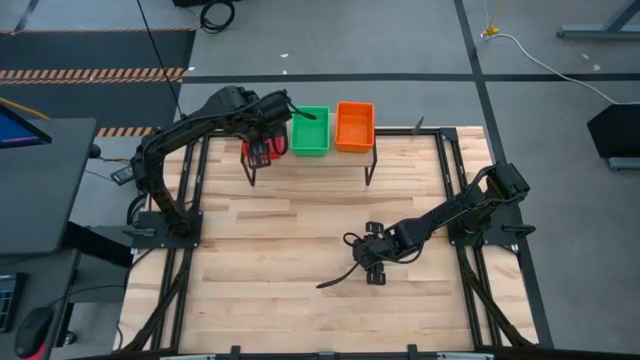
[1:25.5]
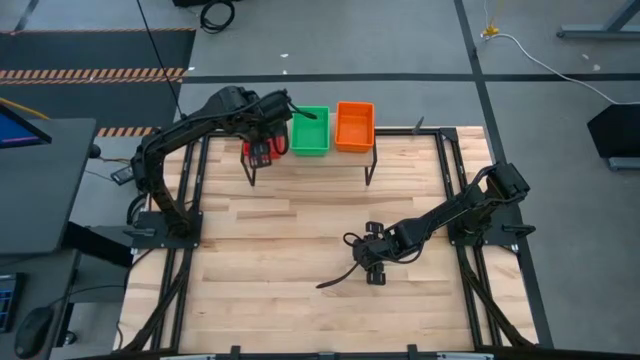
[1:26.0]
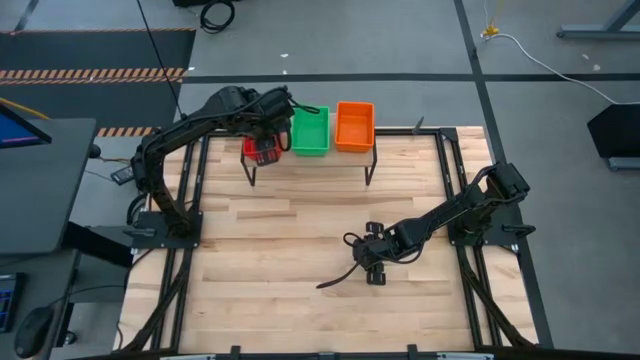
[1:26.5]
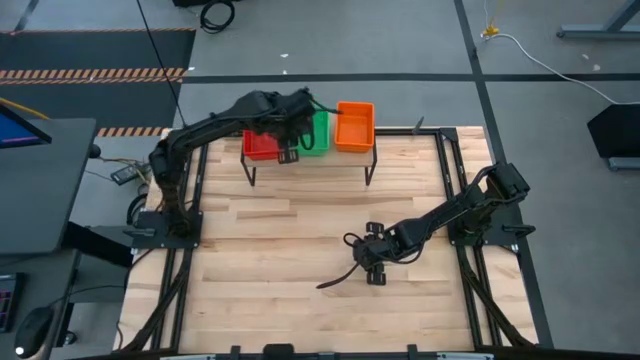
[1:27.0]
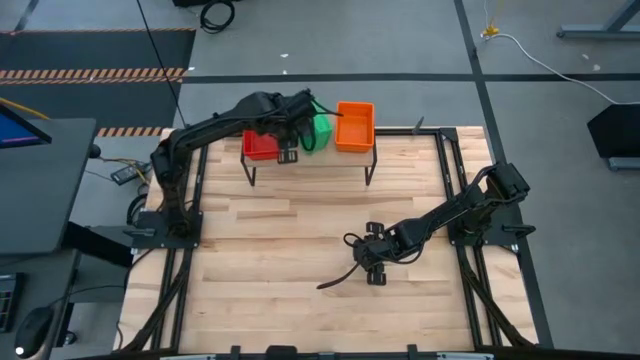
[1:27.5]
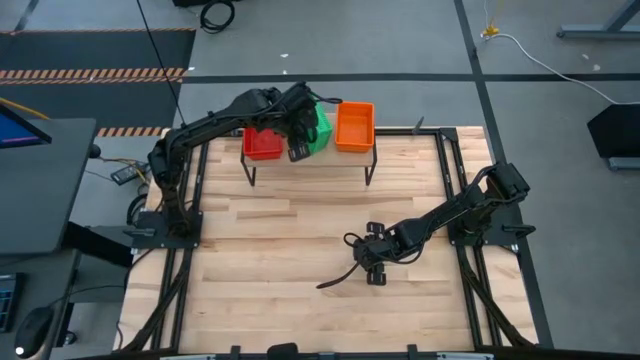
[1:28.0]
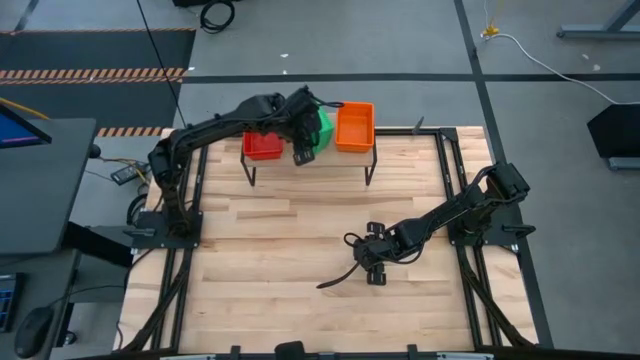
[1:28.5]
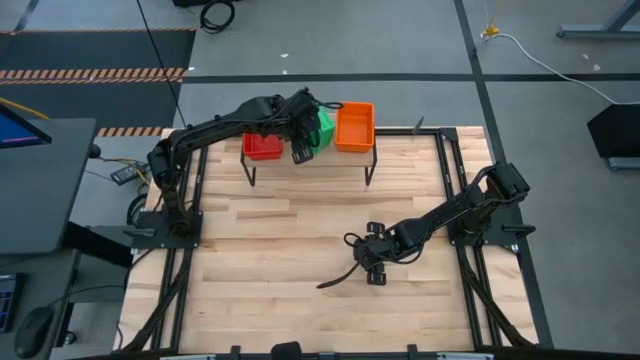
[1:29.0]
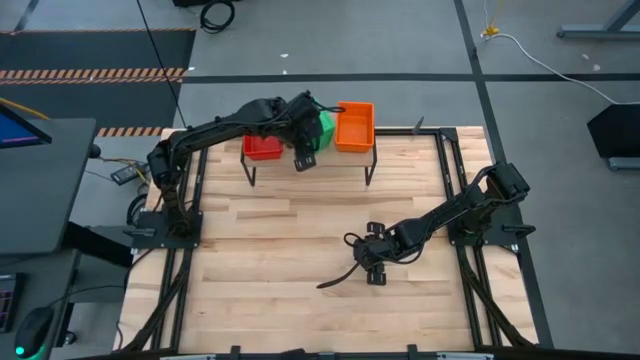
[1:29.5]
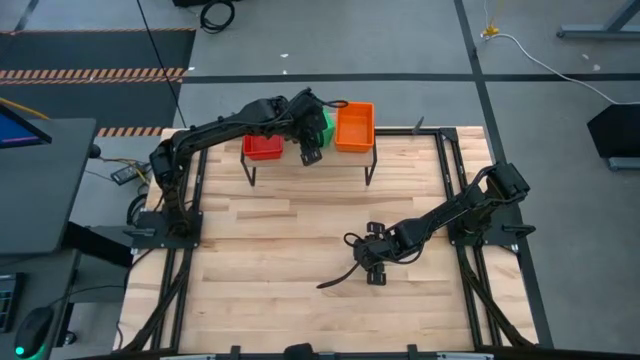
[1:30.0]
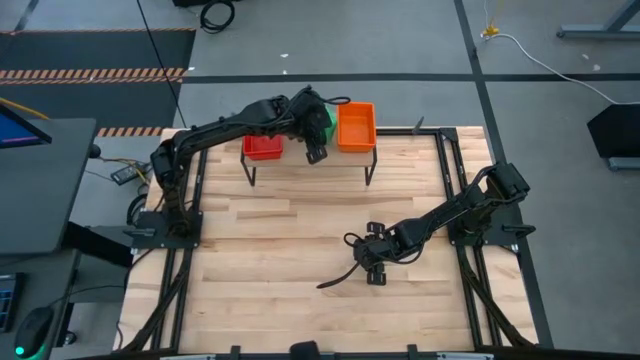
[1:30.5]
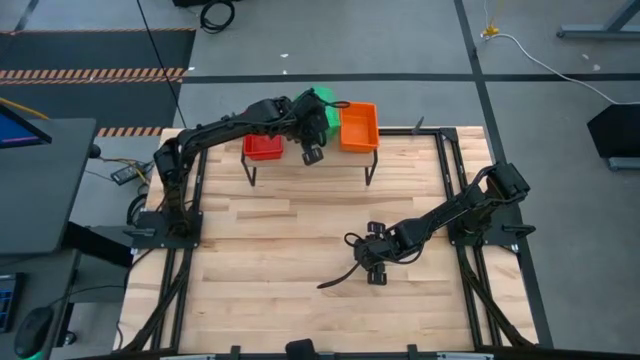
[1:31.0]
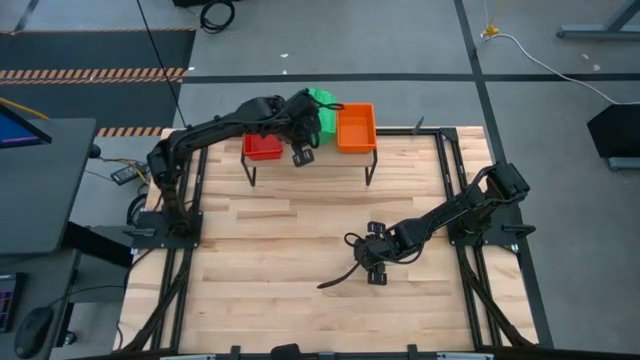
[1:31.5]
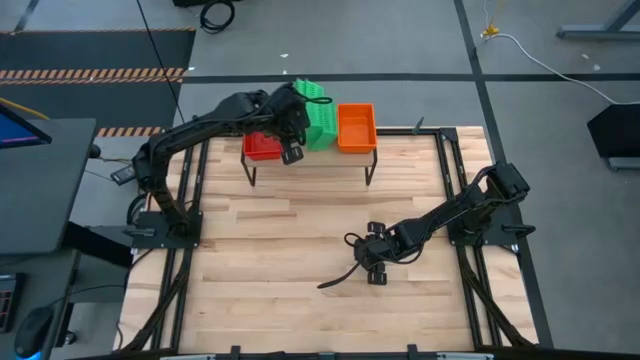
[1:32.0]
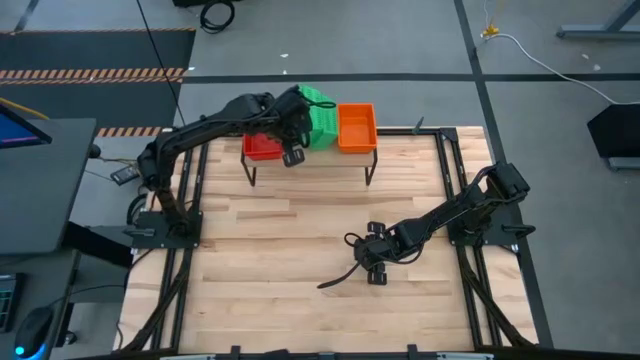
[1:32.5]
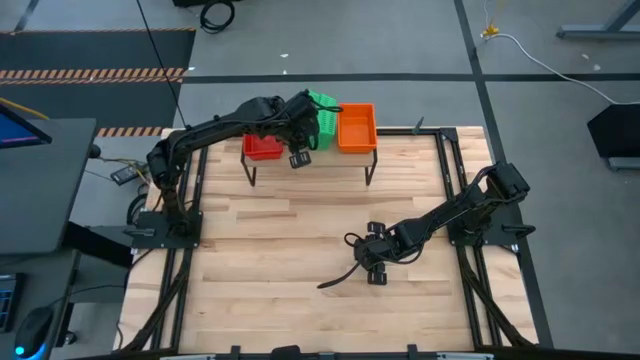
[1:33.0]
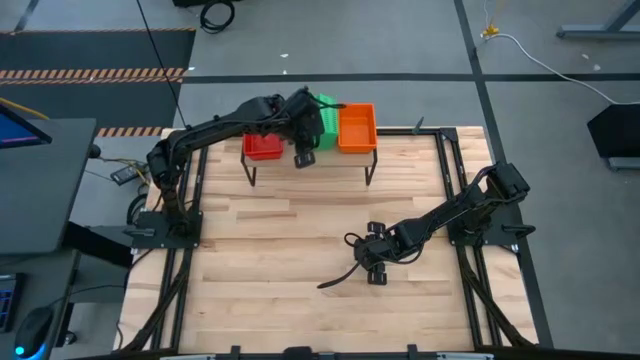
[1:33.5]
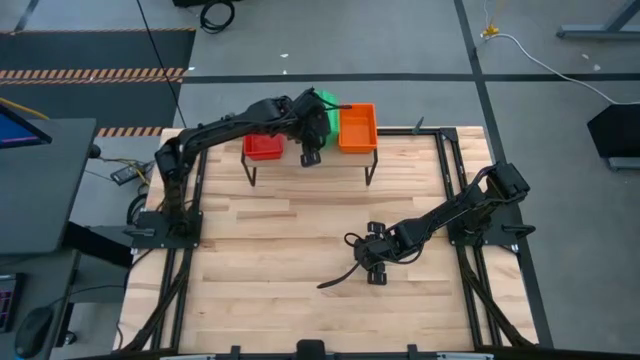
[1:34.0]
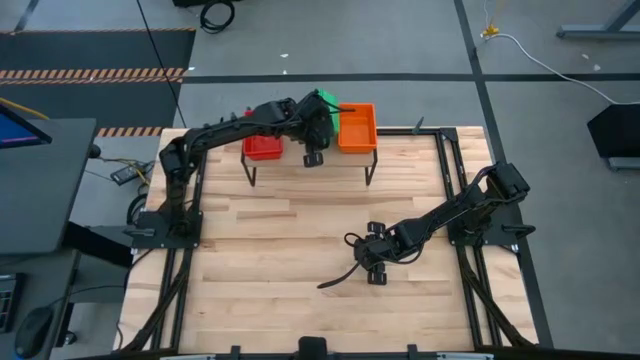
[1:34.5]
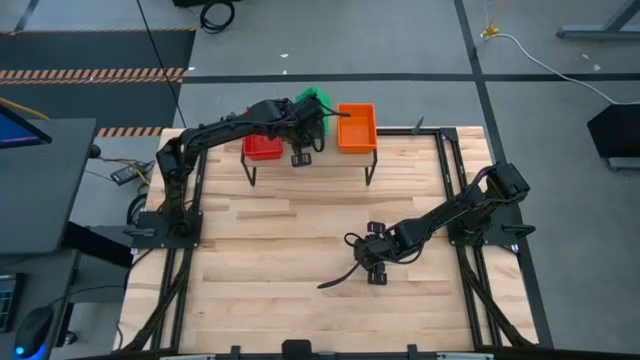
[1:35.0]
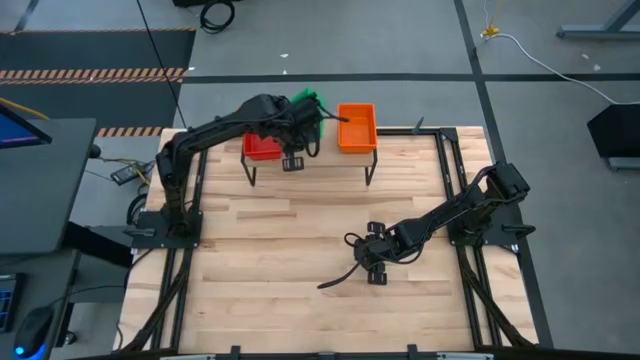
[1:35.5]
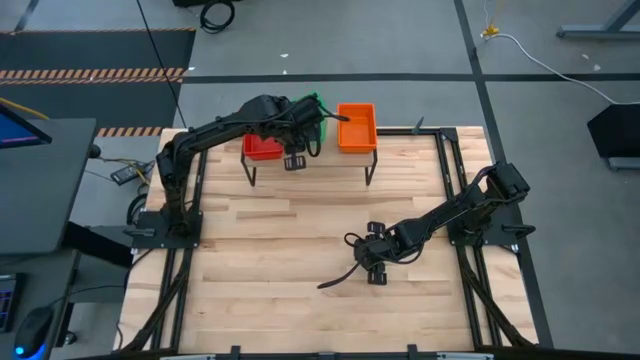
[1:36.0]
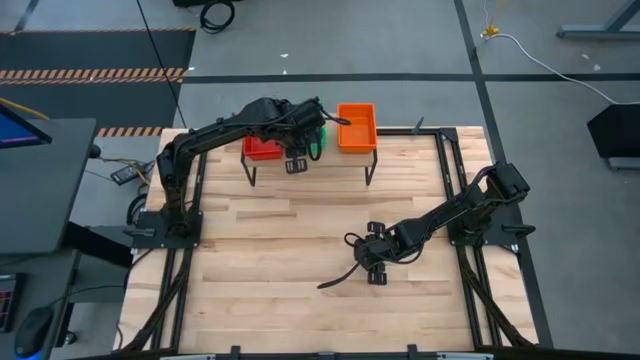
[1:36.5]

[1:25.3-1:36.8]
Task: Stack baskets on shelf by color
Adjust the stacked green baskets on the shelf

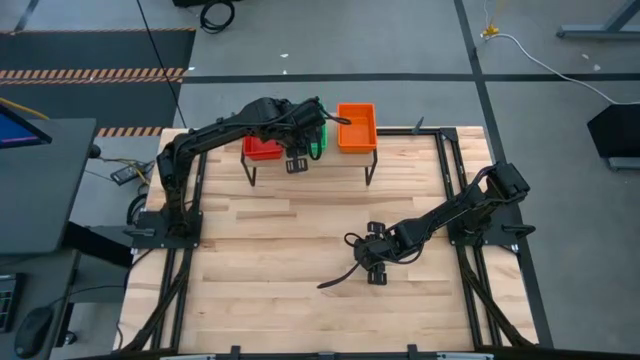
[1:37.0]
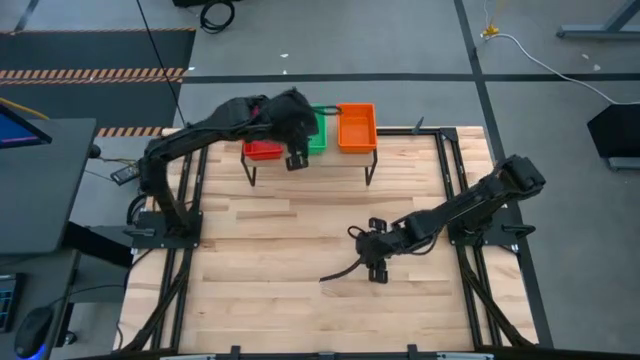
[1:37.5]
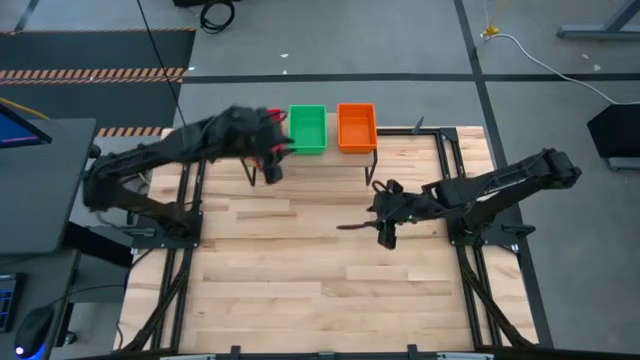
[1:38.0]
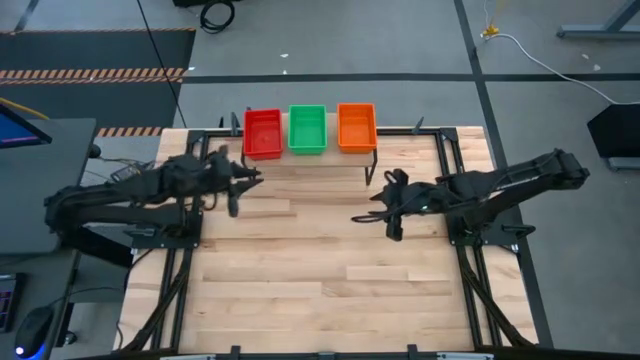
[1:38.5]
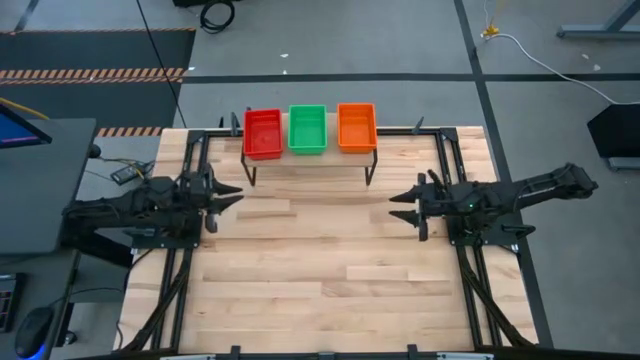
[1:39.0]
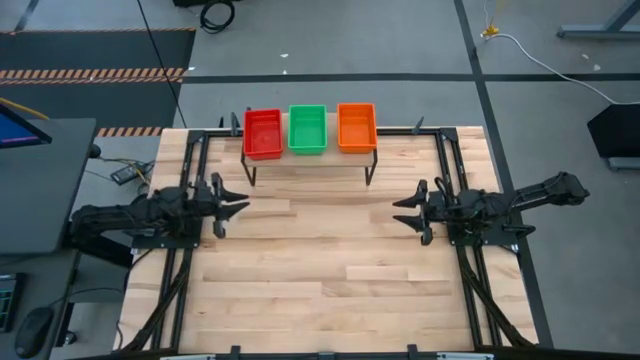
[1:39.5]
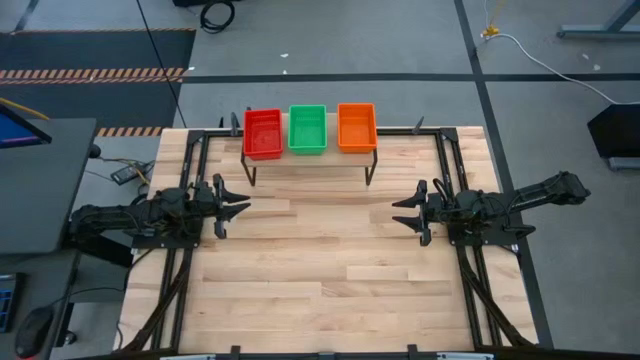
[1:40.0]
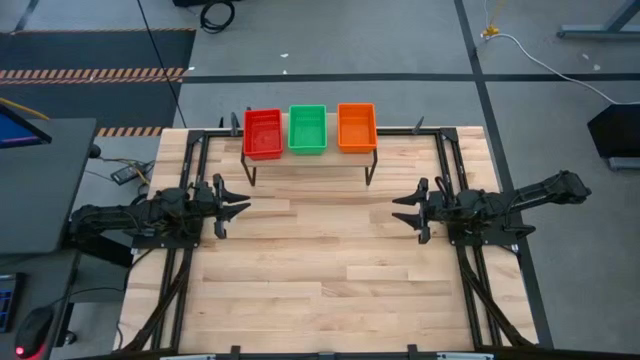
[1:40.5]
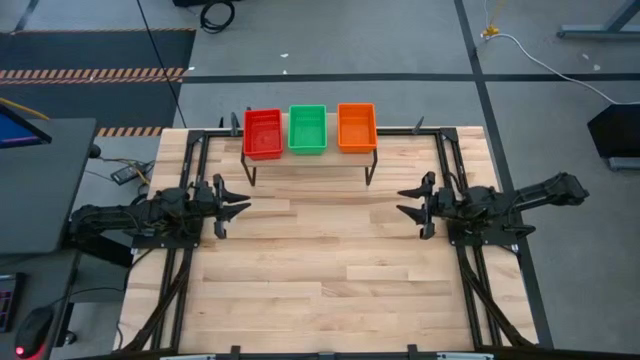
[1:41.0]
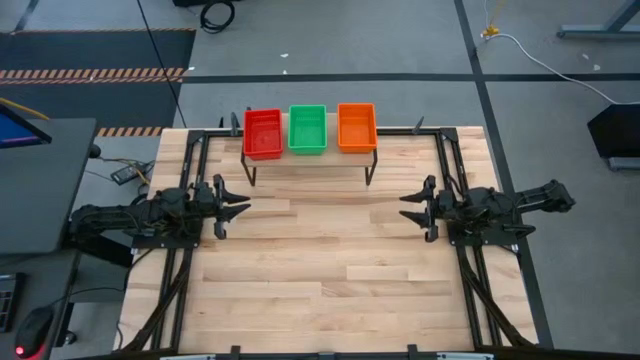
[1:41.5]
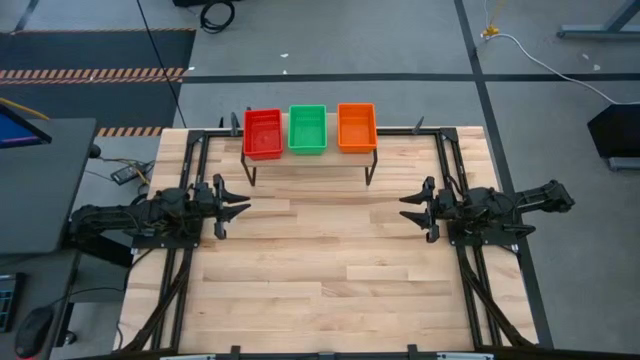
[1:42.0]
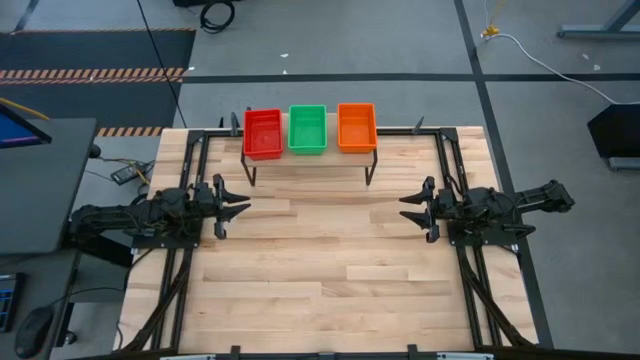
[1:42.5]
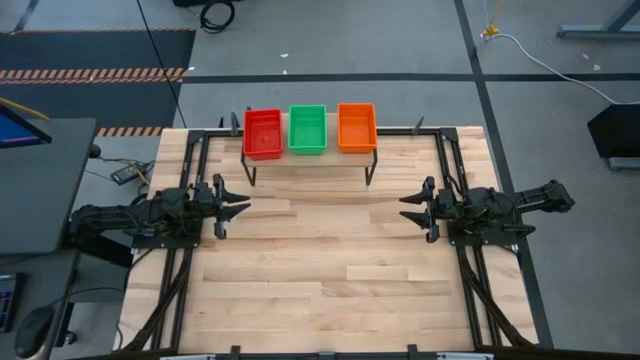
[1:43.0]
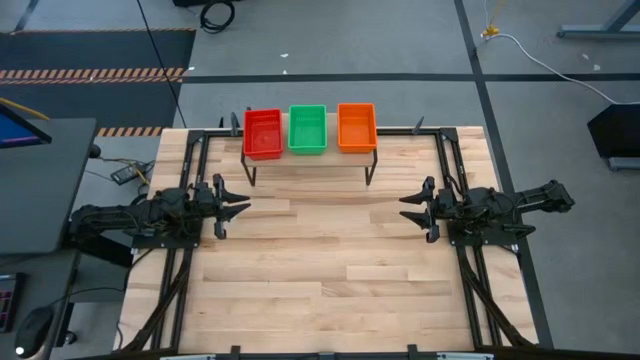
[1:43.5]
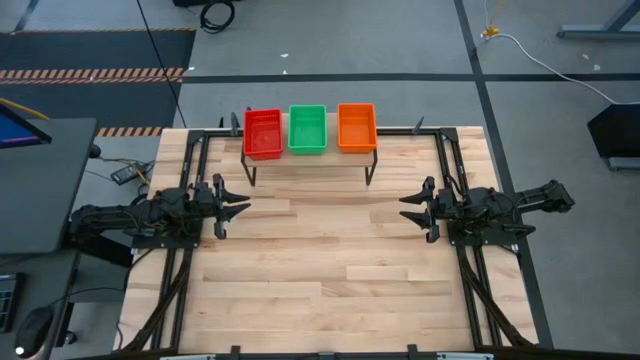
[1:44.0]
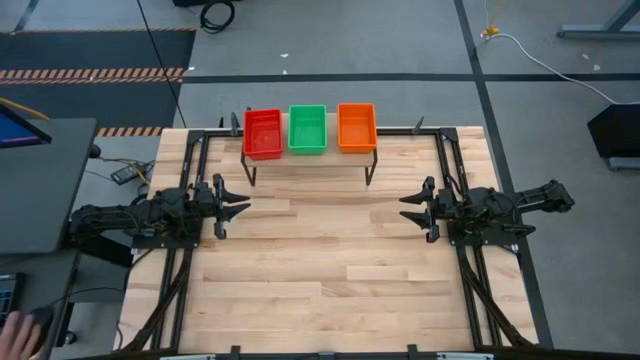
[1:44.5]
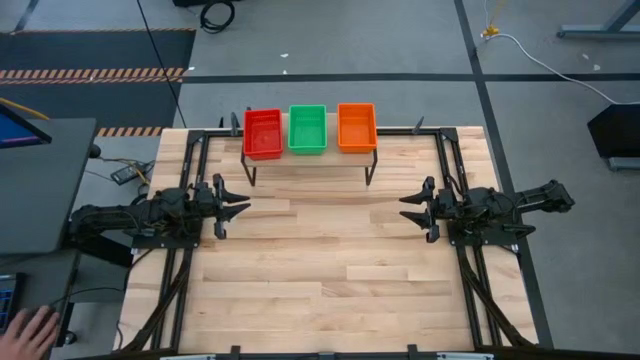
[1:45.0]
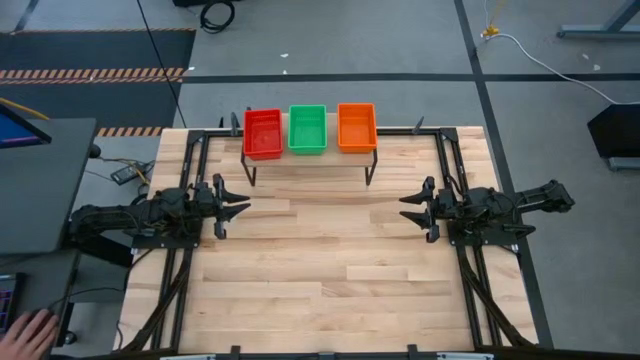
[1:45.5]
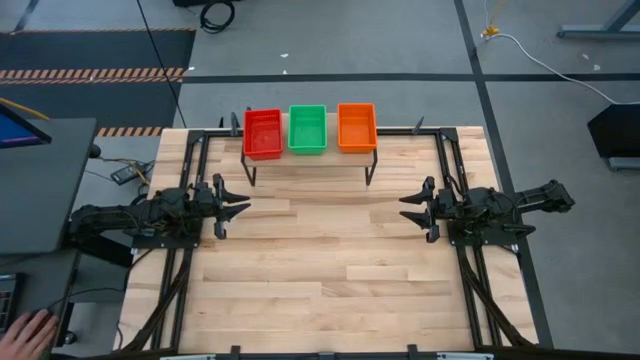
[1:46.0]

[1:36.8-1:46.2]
Return to Home Position
